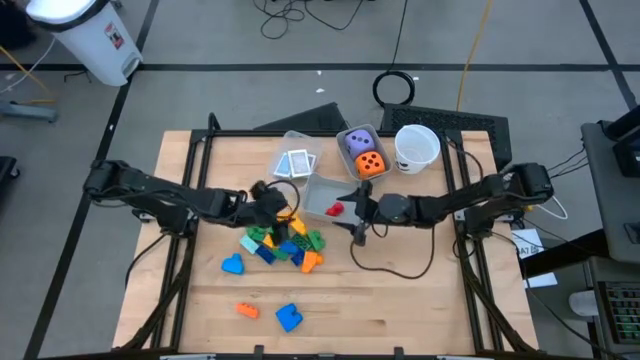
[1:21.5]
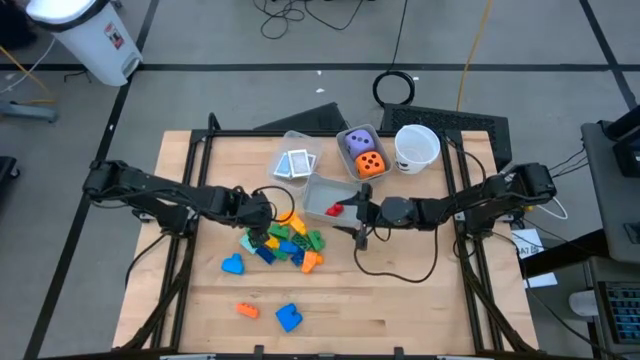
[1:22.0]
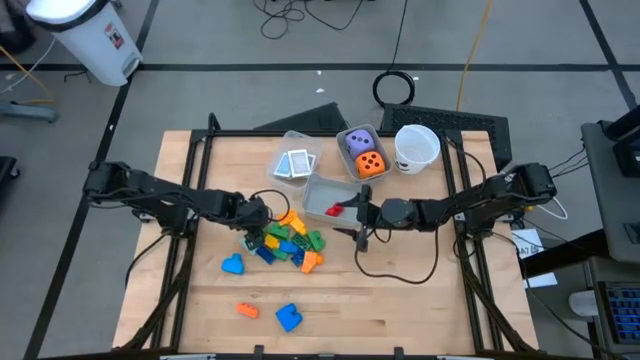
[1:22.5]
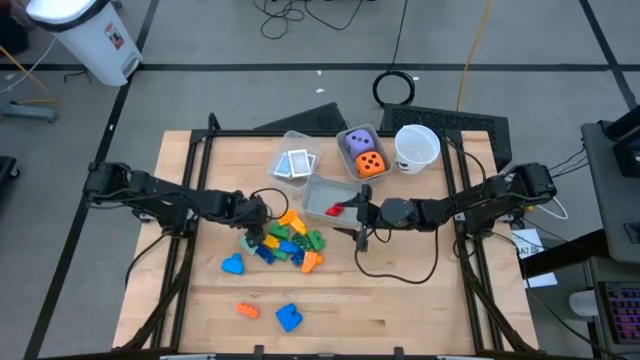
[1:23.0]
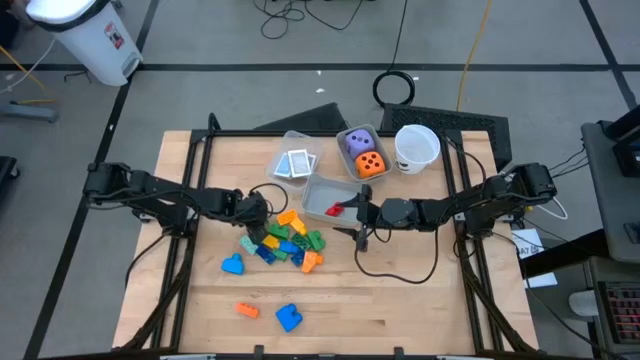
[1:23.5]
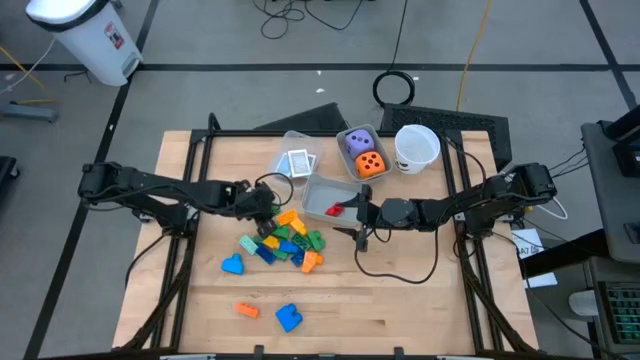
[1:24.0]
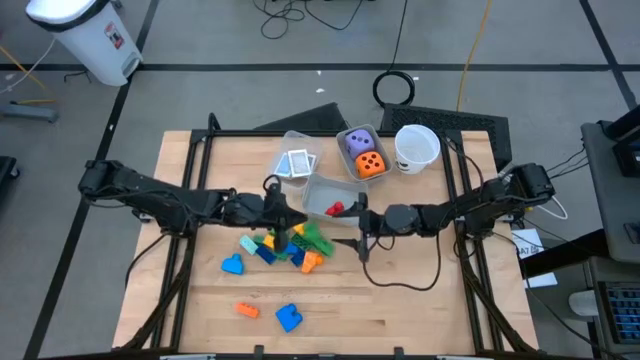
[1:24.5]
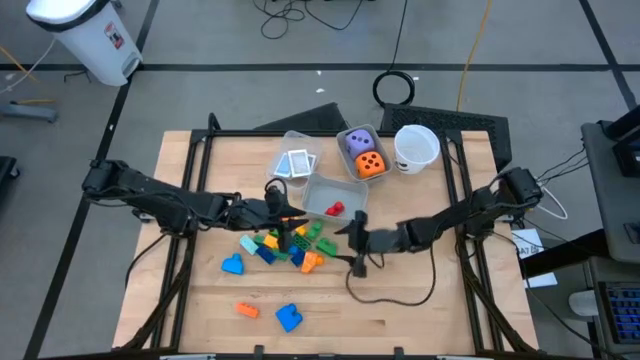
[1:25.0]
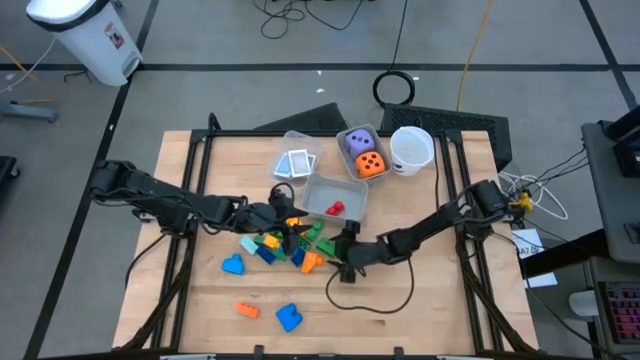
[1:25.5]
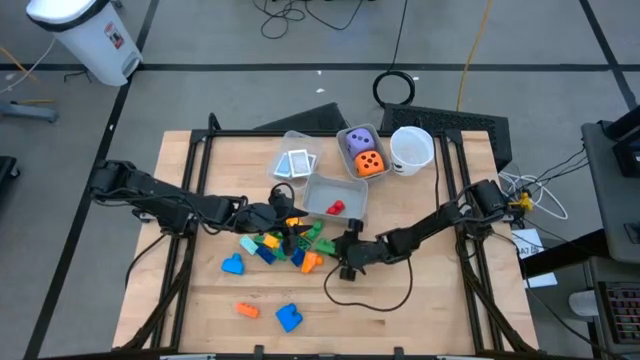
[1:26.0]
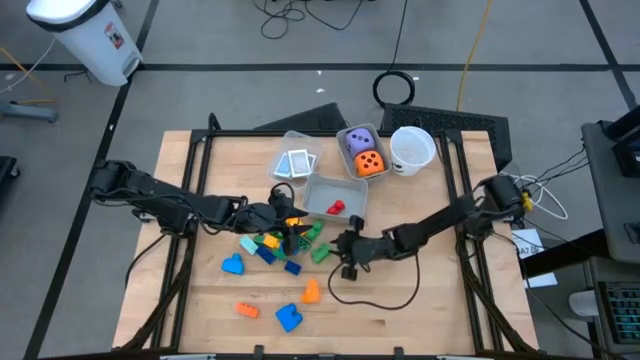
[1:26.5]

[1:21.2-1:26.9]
Task: Pick & Place Toys
Put the green game piece into the bottom gray bin

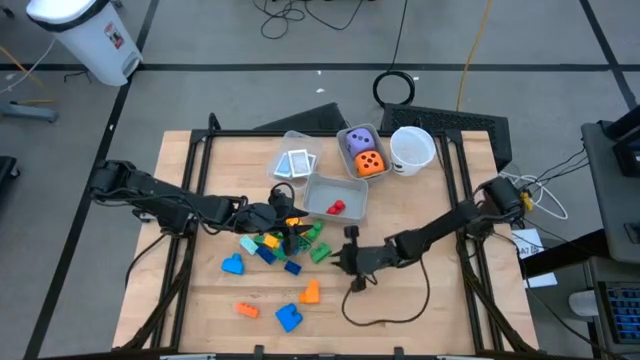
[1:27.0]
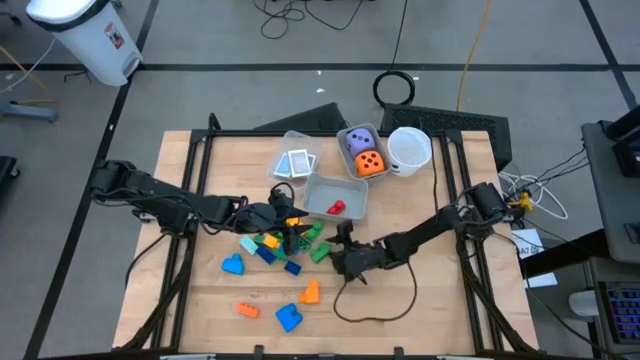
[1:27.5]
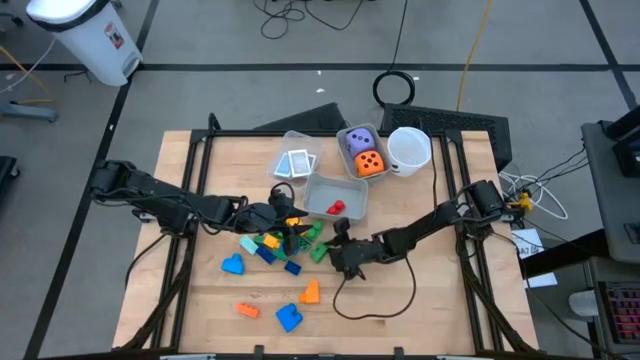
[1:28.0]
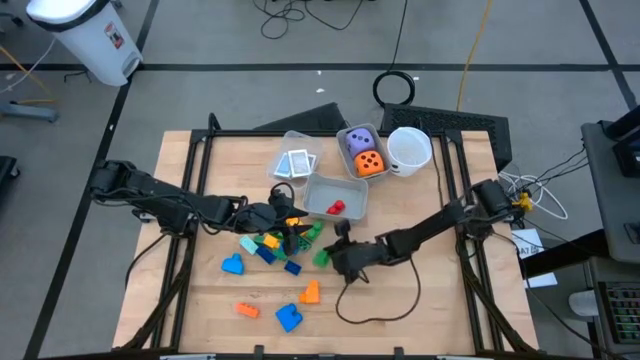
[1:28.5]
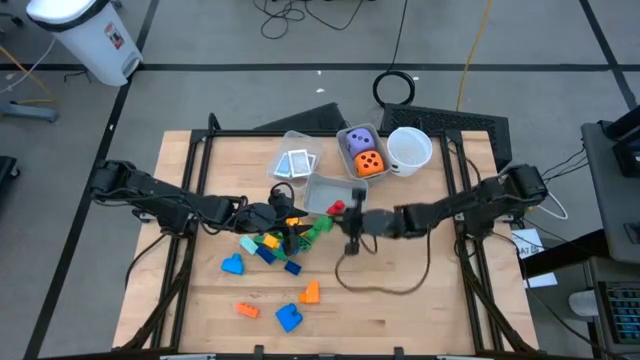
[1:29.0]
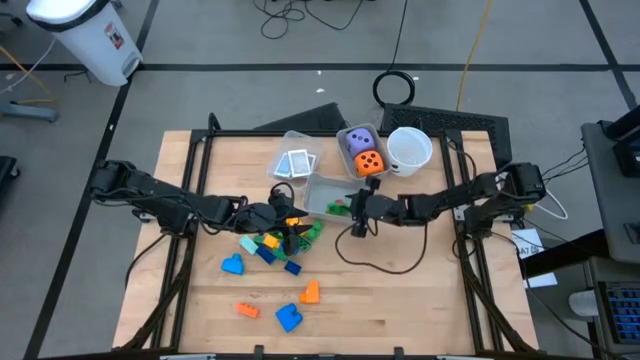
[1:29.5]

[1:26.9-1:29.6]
Put the green game piece into the bottom gray bin

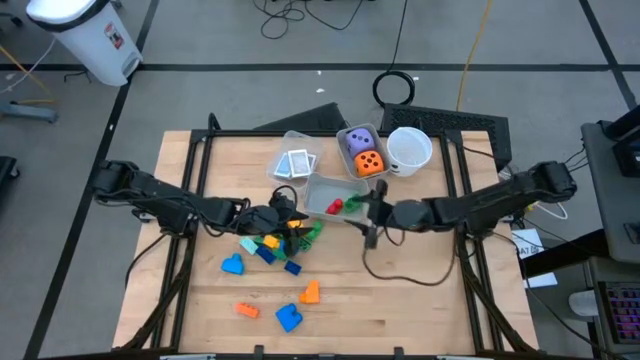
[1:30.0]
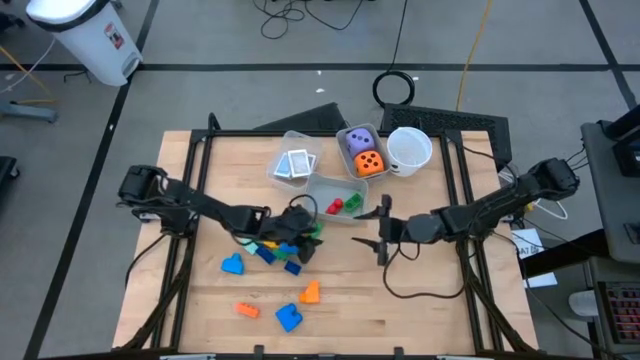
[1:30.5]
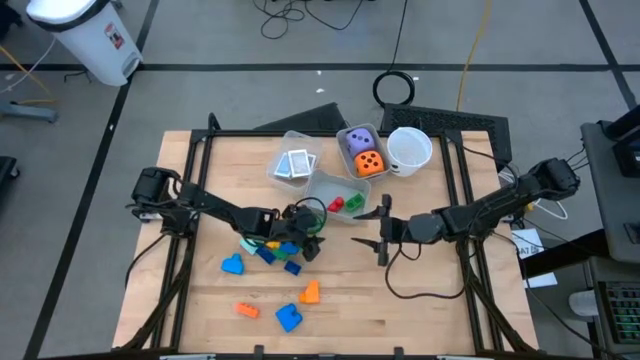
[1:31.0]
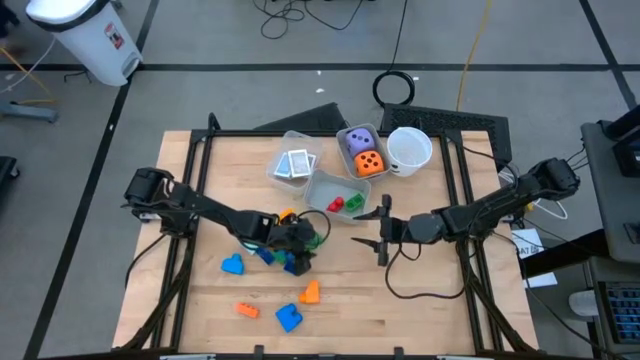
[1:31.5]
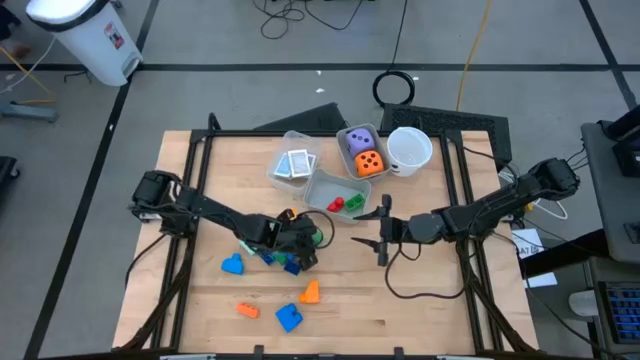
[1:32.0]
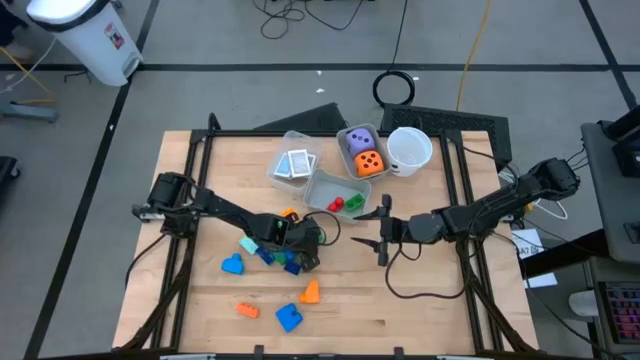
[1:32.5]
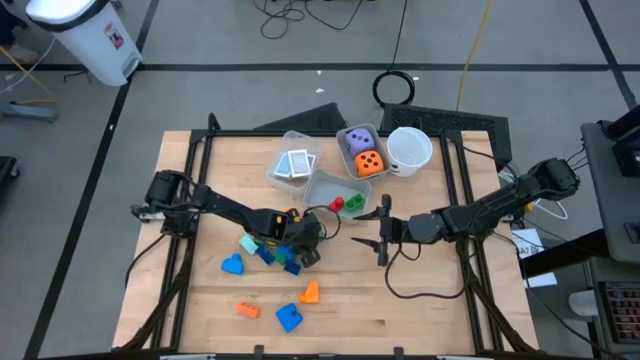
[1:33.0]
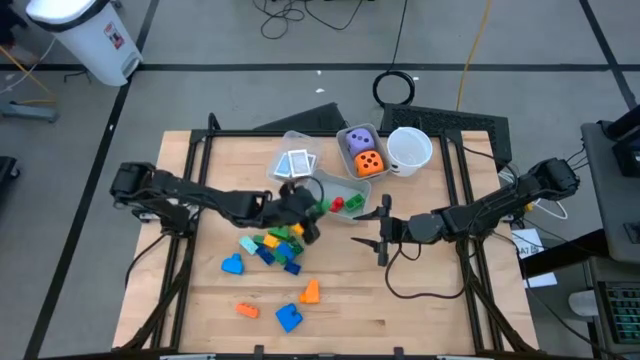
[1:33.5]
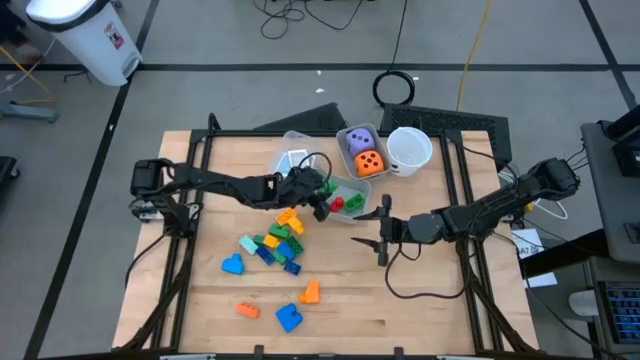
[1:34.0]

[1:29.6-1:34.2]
Put the green game piece into the bottom gray bin

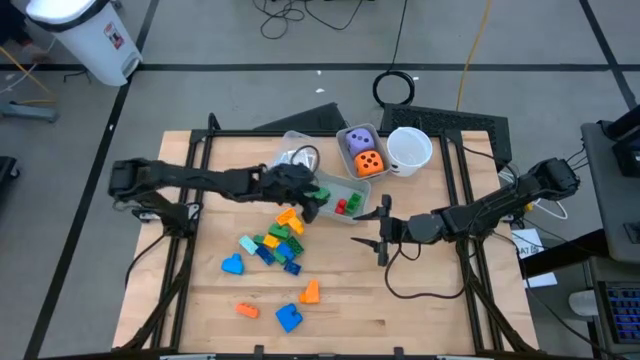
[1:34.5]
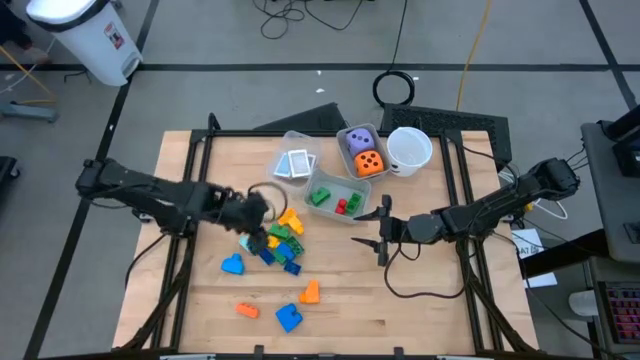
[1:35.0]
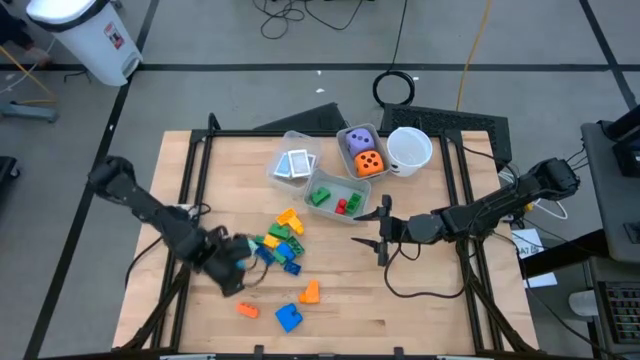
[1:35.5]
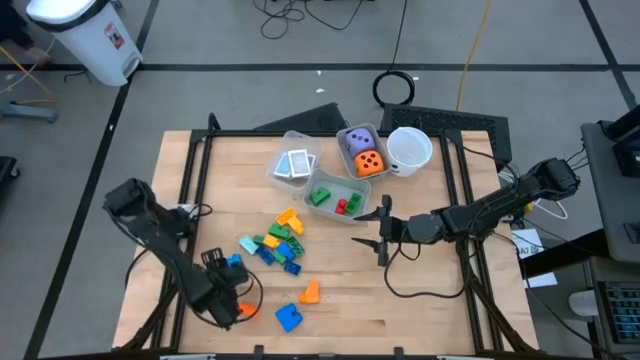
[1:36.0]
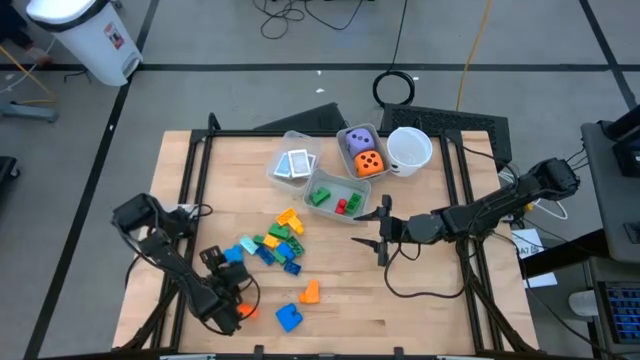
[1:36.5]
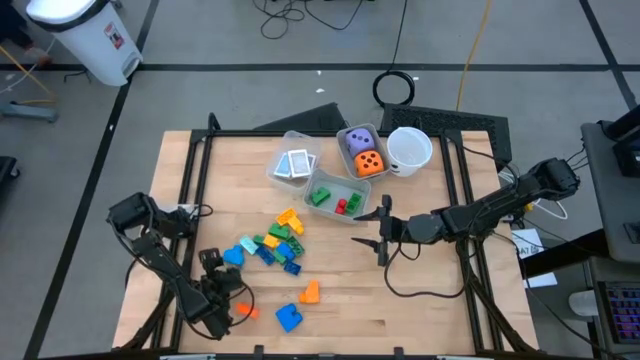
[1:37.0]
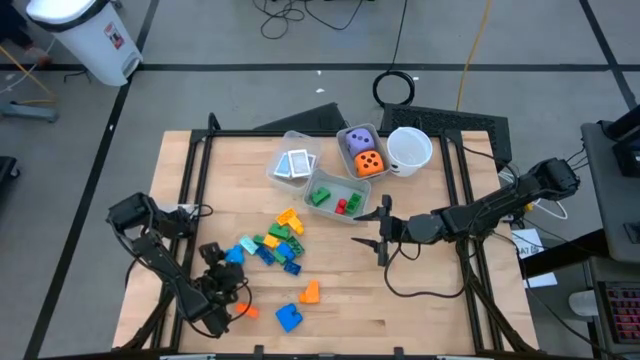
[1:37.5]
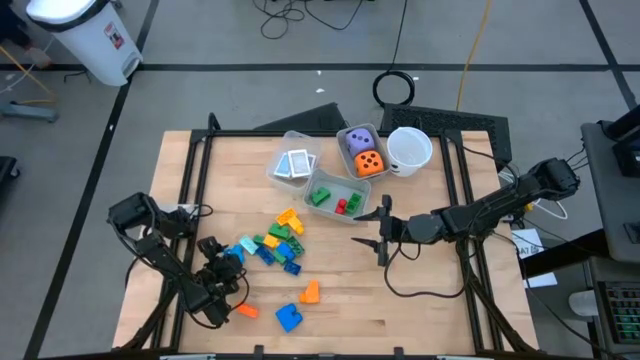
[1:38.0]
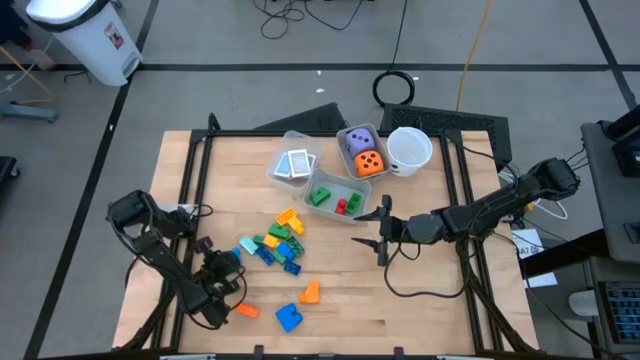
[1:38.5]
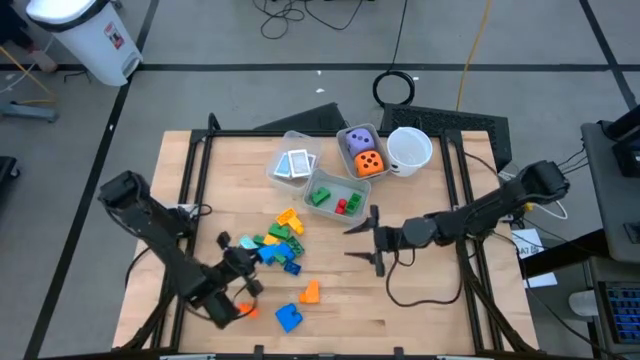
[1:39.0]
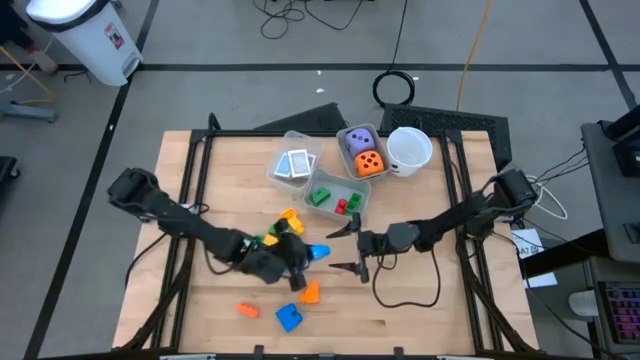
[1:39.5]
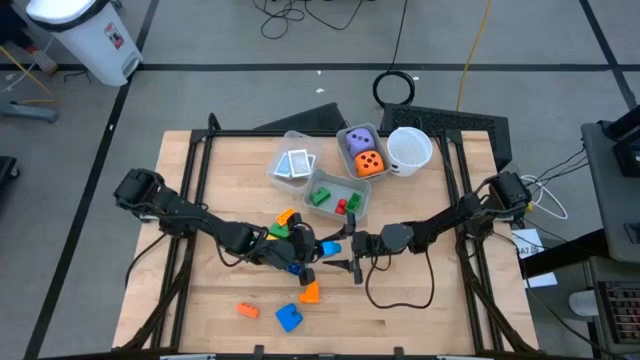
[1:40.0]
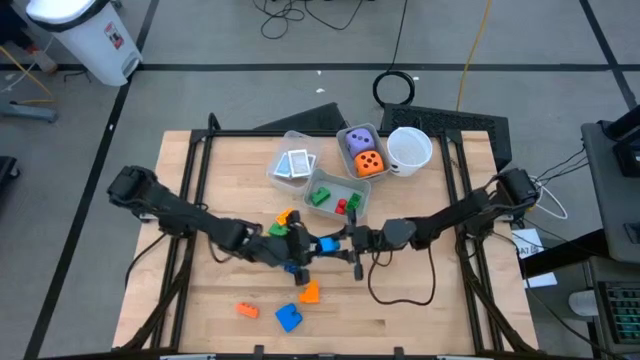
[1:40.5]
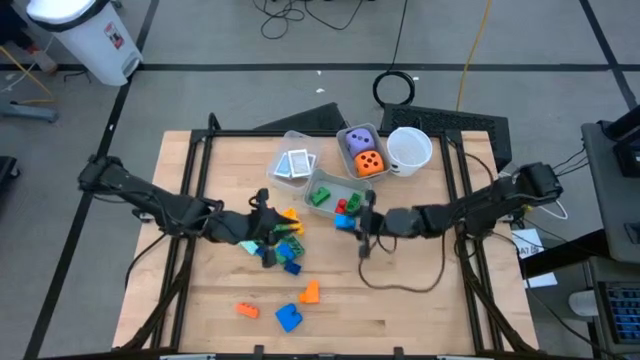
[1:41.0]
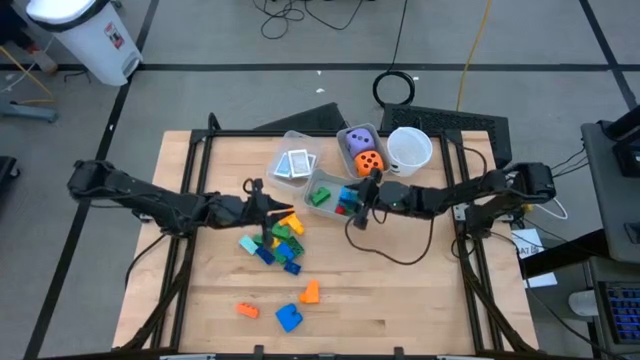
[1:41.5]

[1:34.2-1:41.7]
Put the blue game piece into the bottom gray bin
